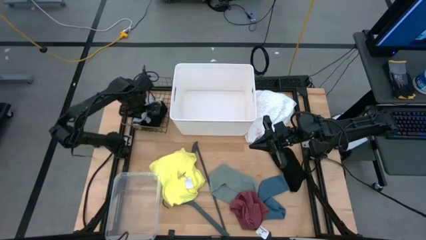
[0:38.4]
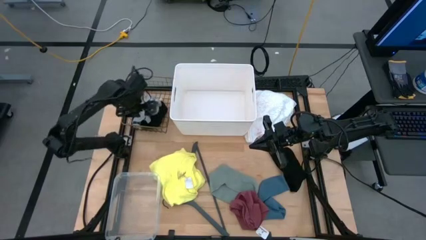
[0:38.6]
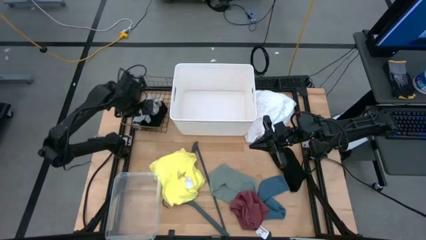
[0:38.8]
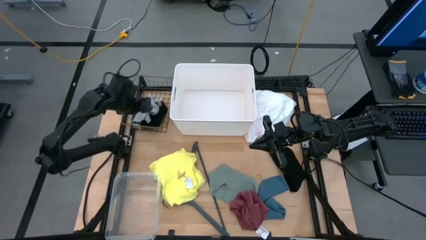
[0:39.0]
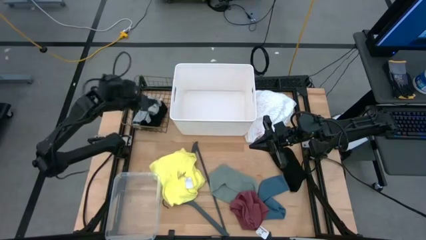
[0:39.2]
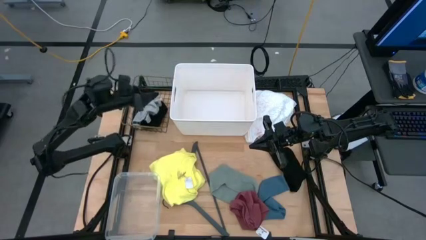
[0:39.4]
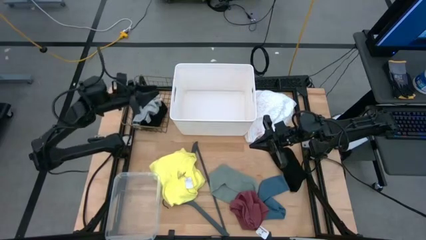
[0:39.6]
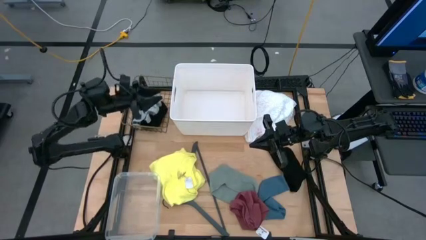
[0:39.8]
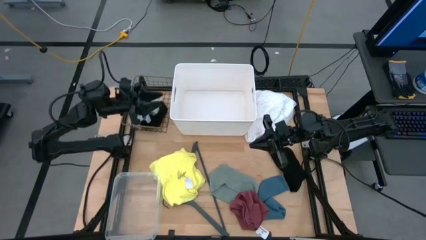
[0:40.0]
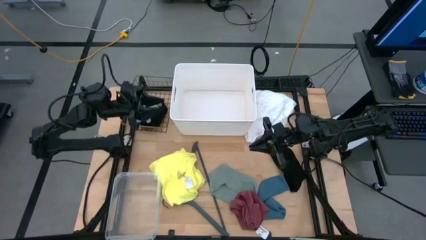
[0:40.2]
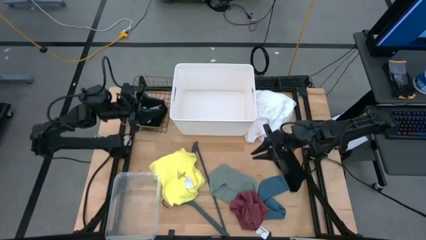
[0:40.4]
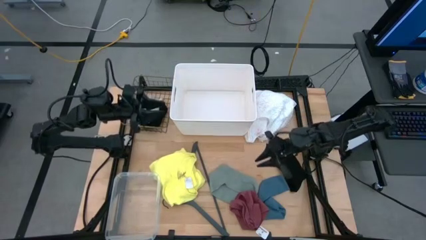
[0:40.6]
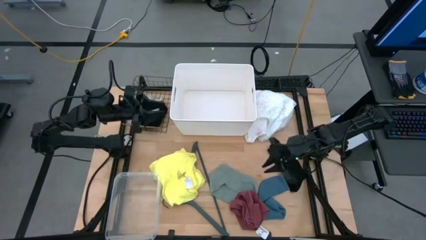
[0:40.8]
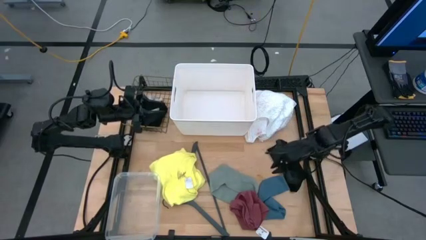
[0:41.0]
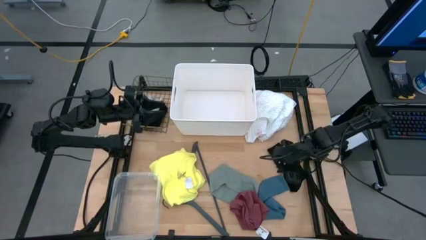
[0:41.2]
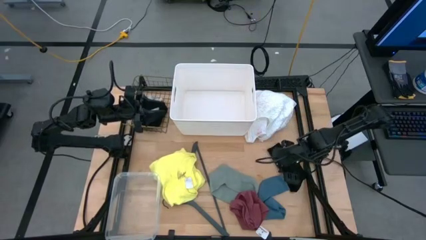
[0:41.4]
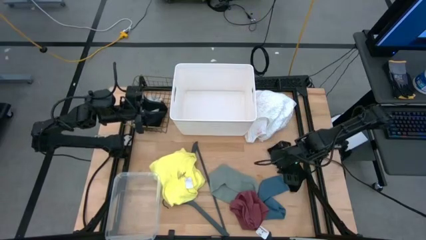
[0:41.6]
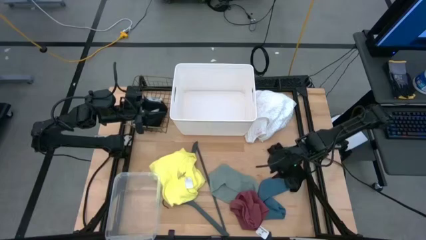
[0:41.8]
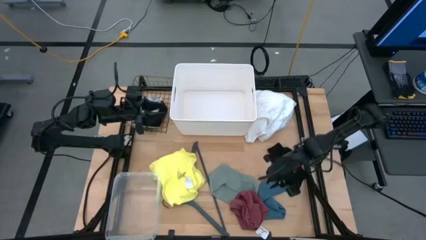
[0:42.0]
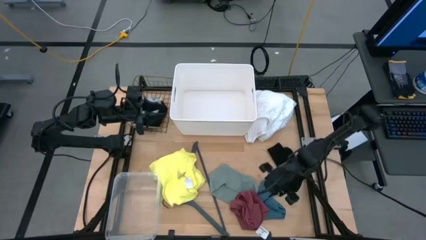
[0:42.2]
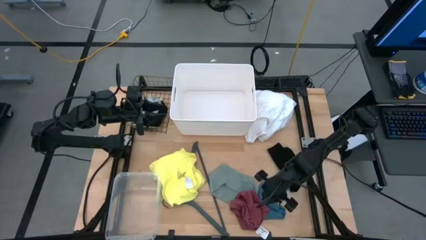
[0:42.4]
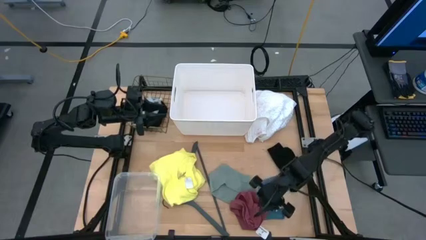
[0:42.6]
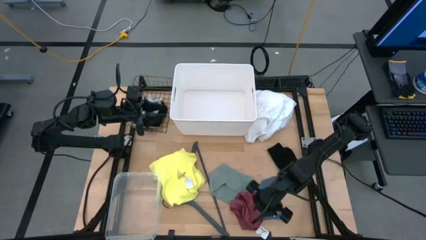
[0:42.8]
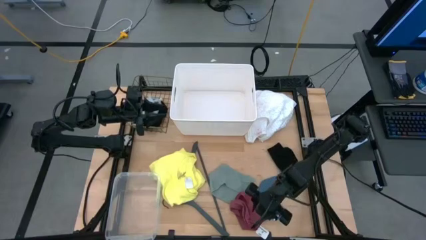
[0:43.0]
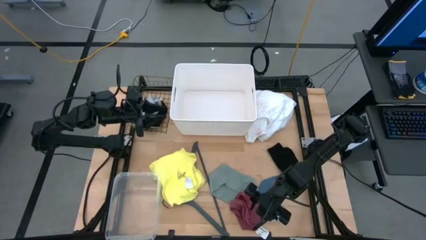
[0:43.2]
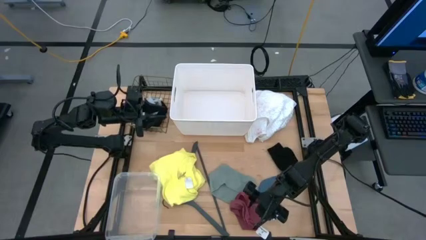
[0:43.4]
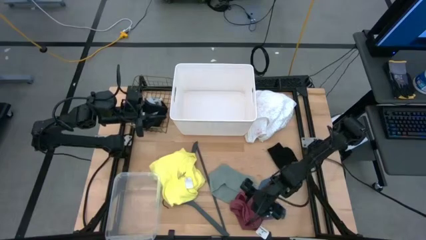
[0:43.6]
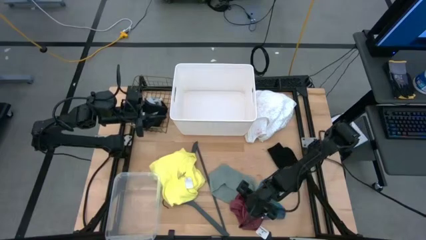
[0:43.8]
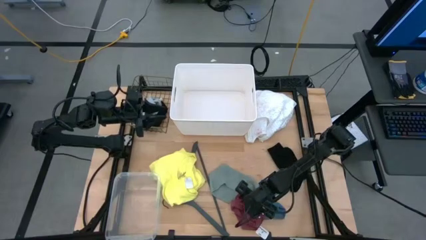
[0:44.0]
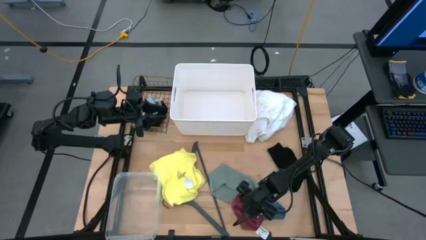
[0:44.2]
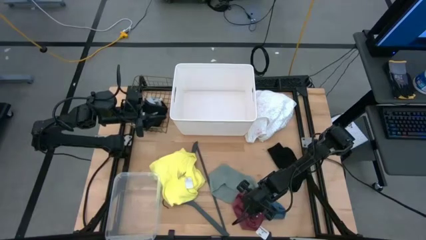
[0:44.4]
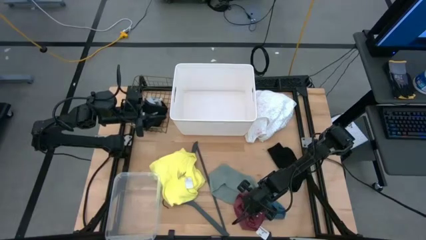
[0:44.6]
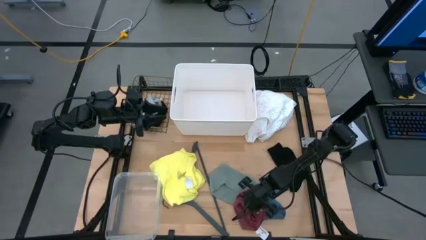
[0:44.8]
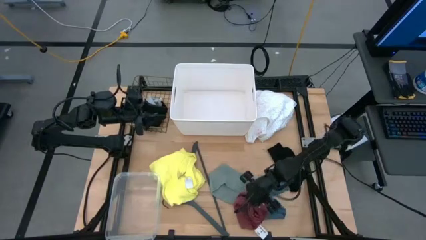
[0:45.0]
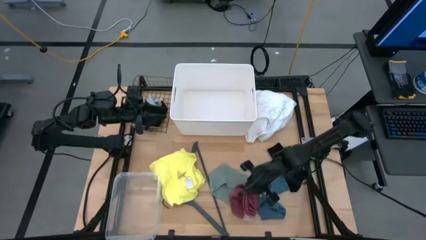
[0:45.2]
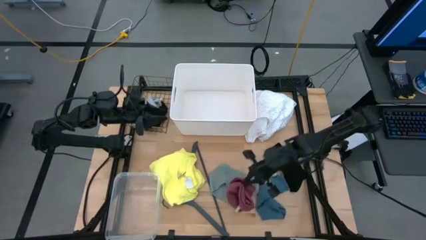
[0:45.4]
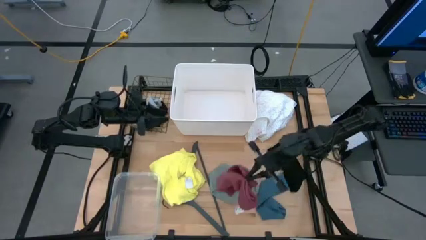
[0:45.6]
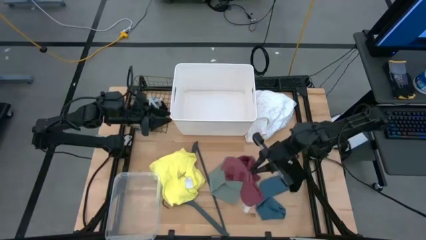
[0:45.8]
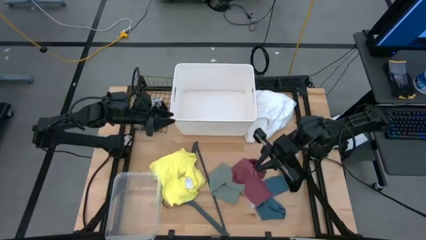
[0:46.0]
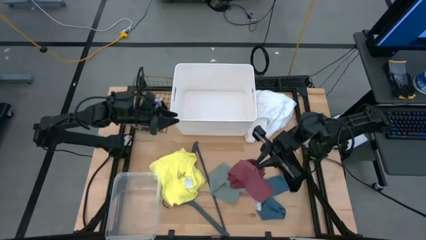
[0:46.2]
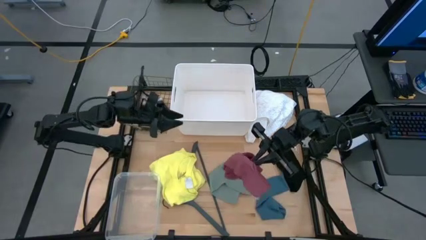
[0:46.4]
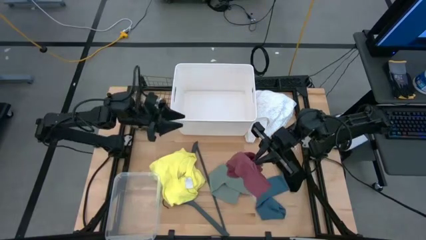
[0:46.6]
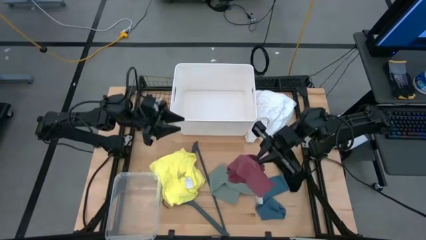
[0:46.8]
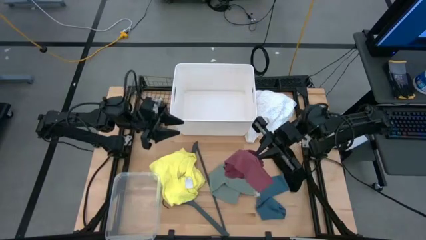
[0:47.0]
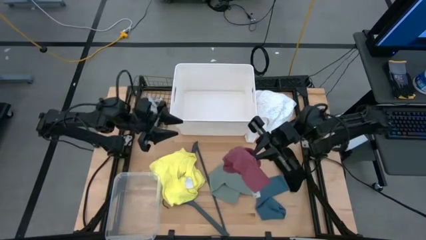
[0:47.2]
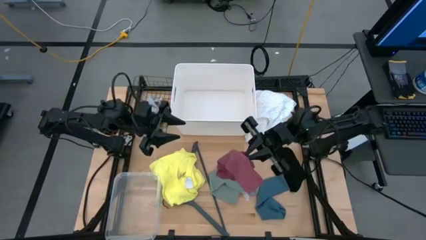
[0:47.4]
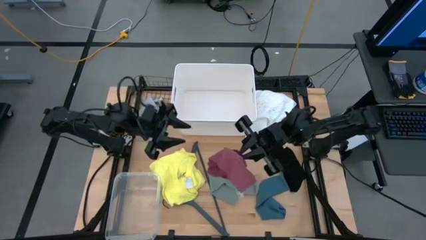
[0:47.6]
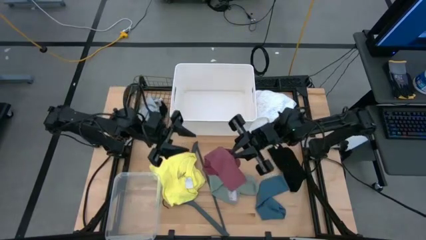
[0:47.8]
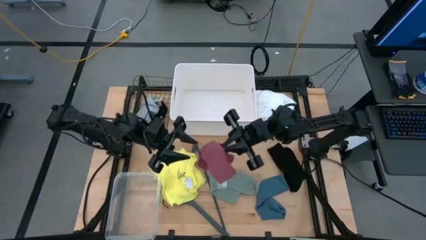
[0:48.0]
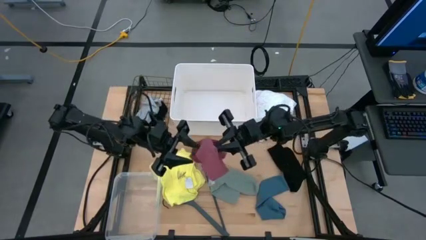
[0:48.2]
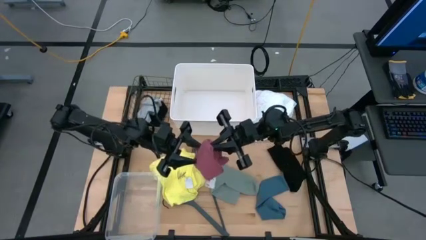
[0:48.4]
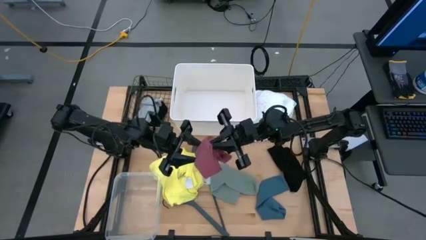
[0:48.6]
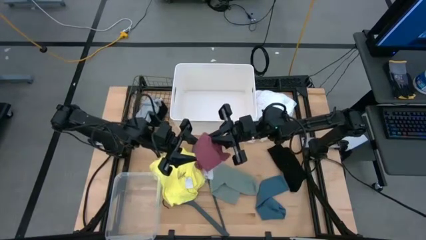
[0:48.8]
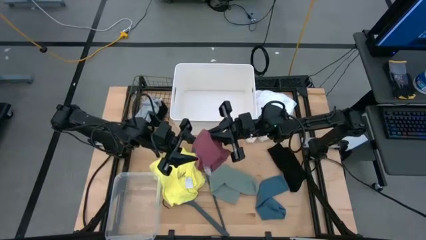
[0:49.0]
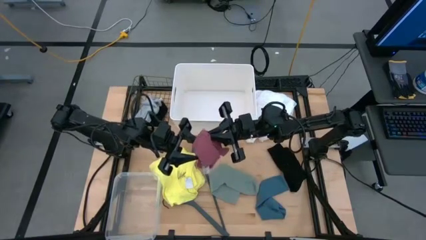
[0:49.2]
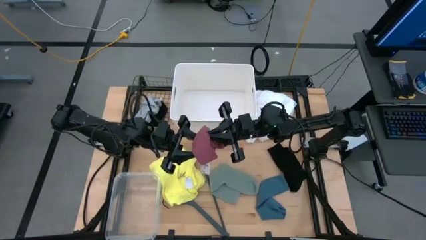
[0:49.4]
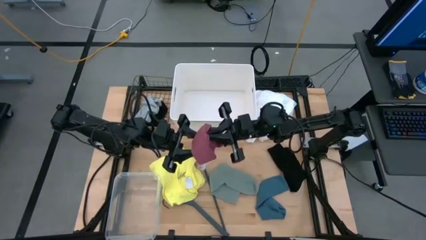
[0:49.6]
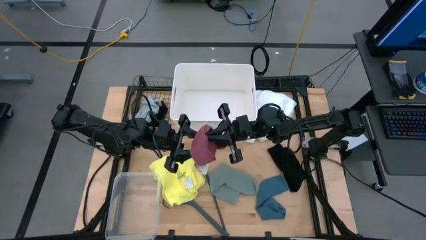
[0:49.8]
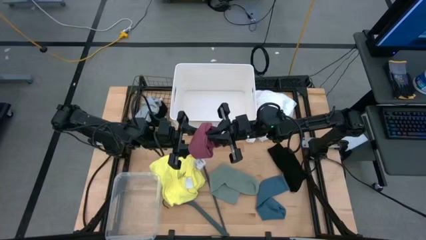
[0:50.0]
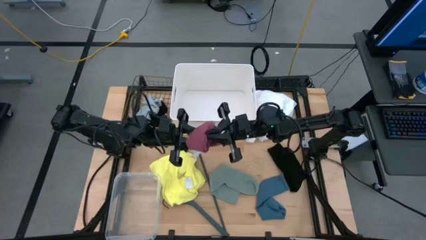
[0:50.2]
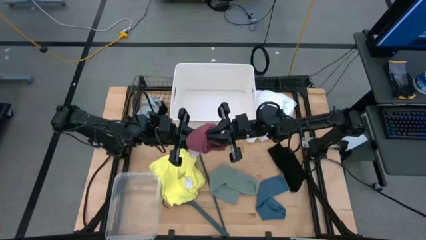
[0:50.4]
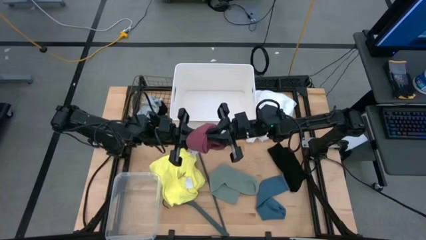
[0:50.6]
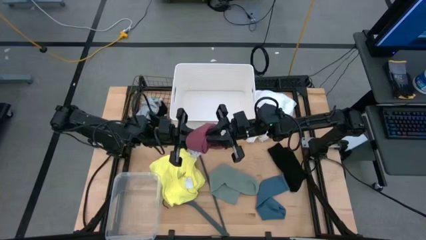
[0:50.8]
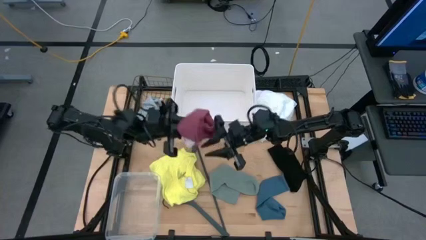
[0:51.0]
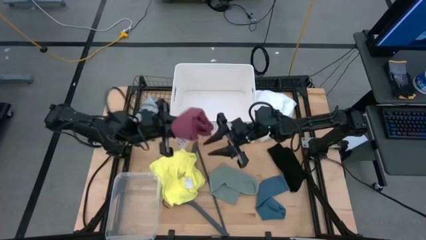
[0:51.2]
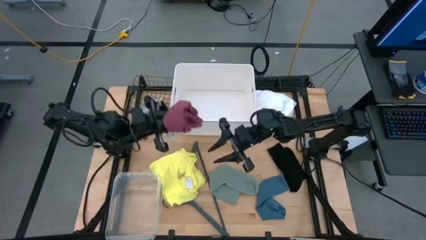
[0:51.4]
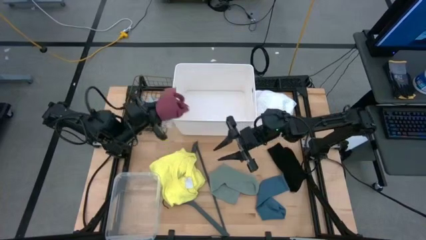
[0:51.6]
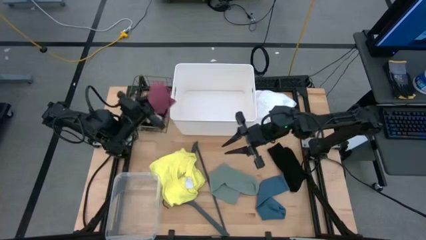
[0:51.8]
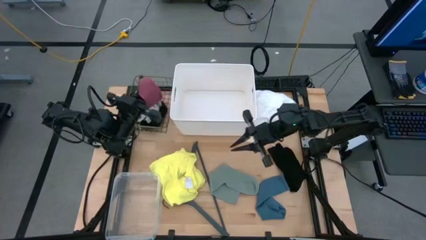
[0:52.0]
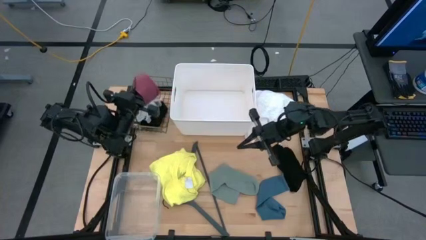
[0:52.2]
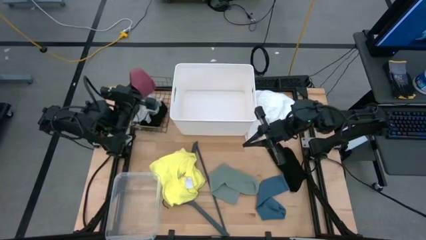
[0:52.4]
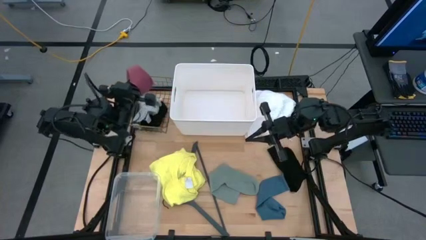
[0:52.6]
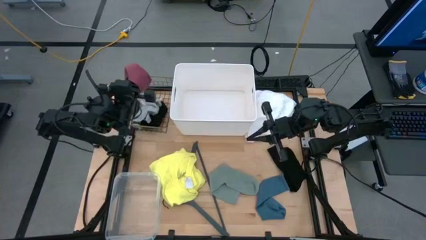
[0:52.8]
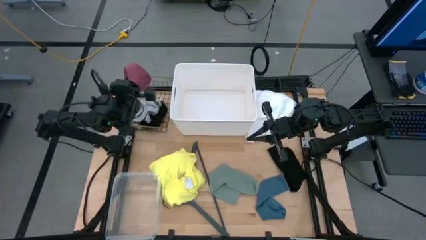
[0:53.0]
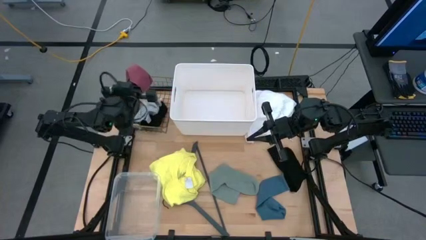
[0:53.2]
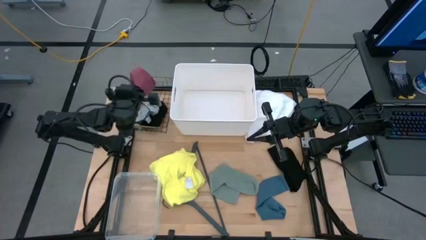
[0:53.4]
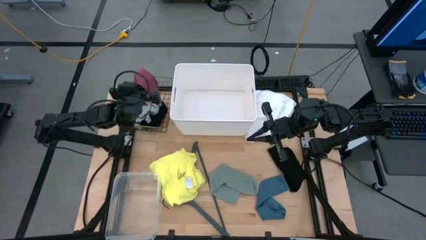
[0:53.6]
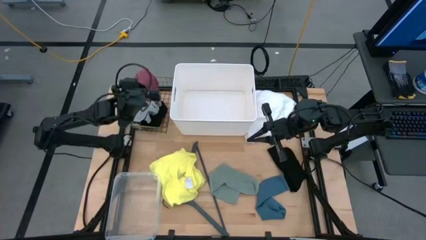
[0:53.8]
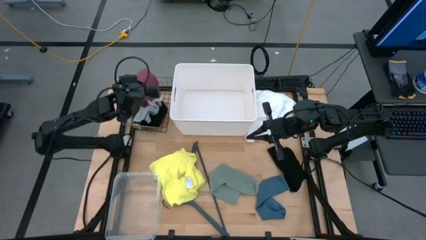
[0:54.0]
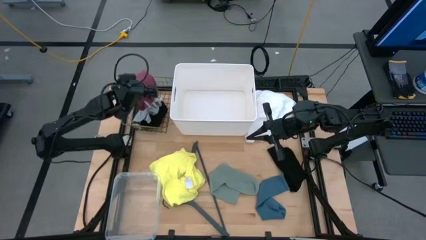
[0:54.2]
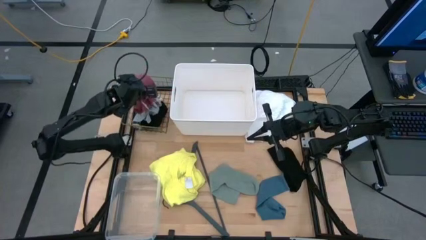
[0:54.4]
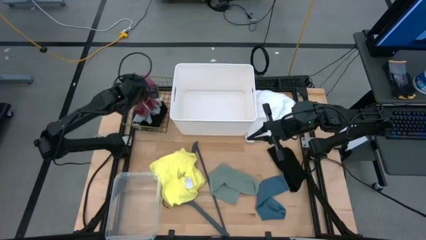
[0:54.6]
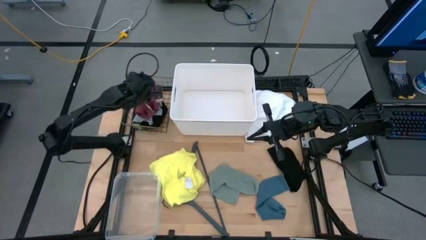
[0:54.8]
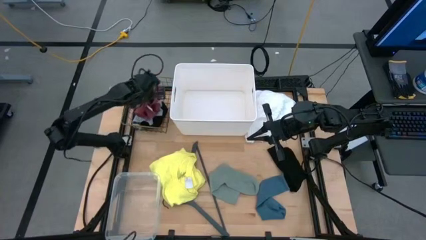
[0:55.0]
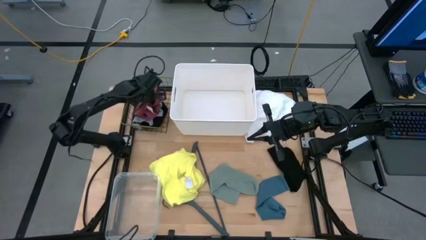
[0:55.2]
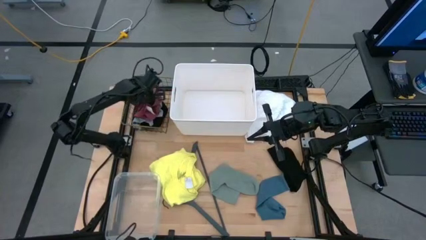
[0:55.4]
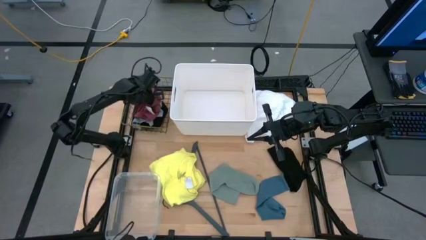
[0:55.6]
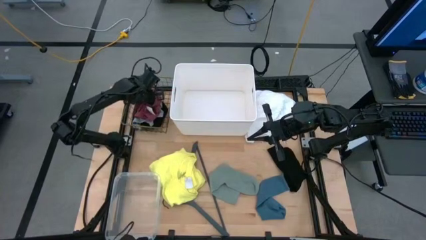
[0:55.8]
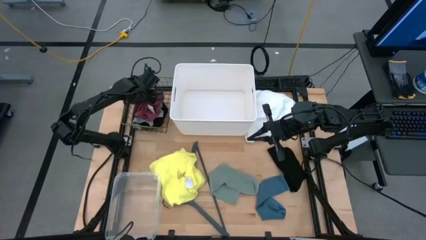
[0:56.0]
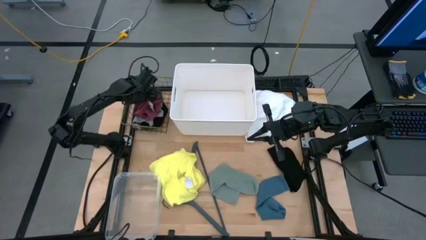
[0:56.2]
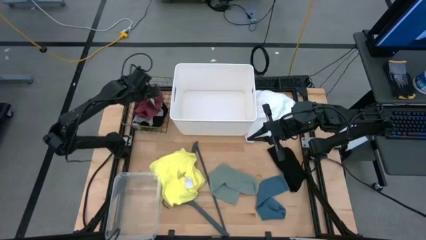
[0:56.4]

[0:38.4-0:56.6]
Task: Pick & Place Cloths
Put the red underwear into the wired basket
